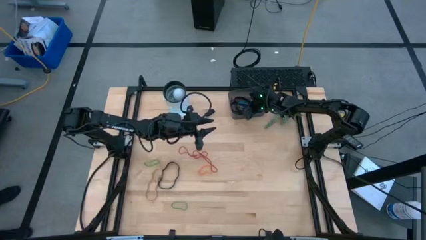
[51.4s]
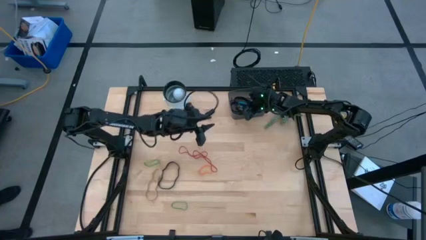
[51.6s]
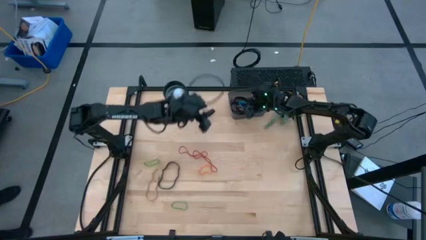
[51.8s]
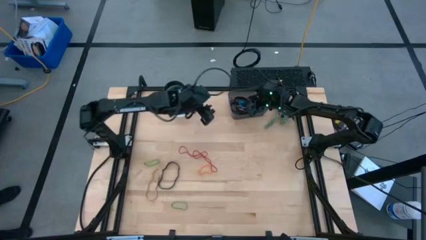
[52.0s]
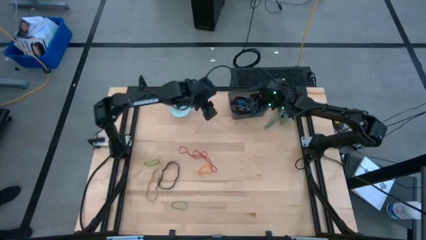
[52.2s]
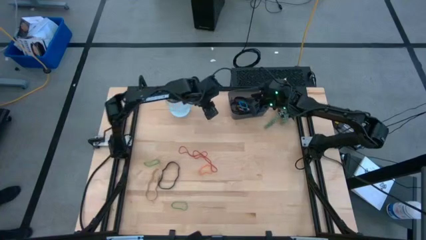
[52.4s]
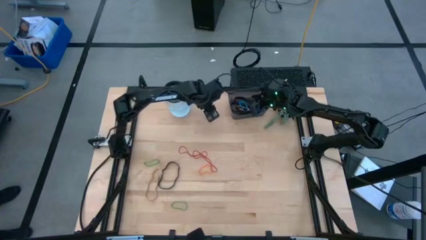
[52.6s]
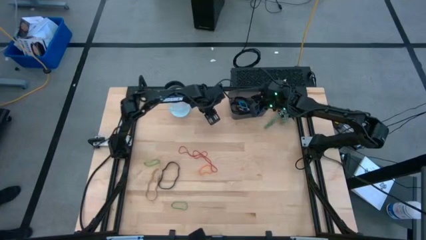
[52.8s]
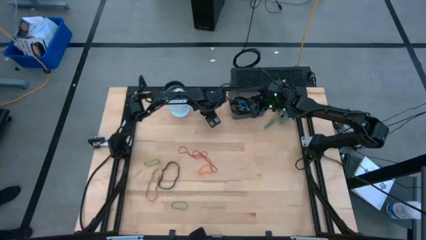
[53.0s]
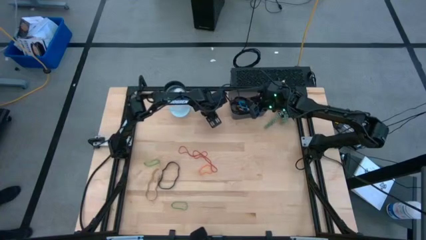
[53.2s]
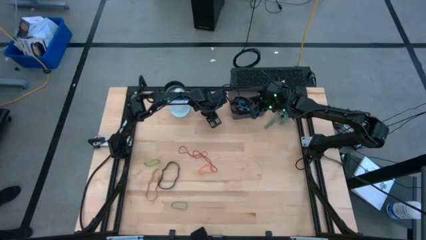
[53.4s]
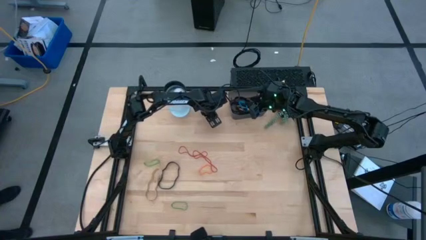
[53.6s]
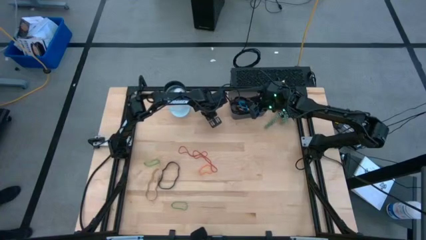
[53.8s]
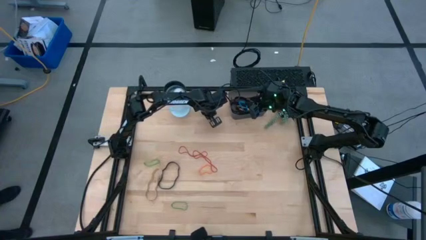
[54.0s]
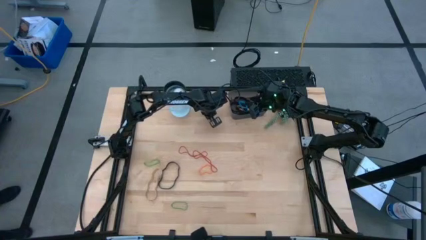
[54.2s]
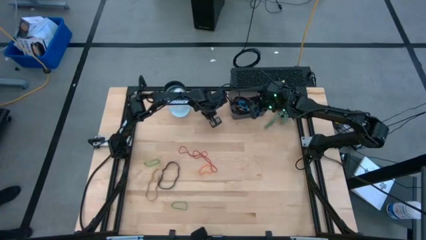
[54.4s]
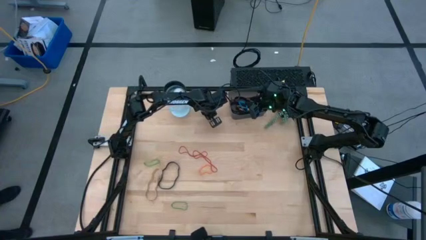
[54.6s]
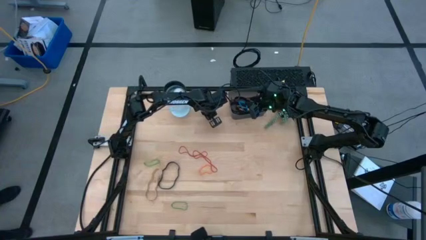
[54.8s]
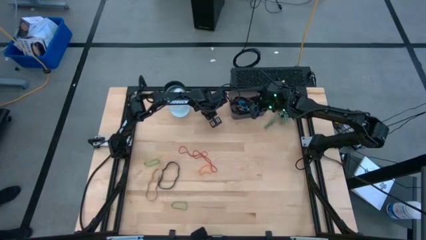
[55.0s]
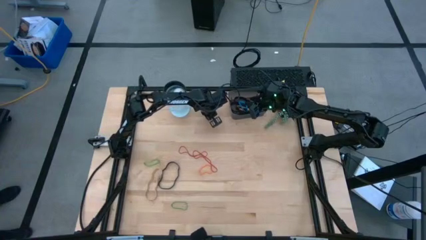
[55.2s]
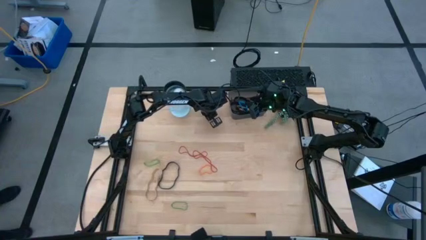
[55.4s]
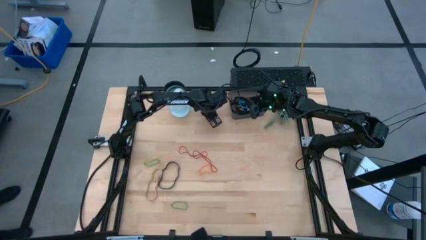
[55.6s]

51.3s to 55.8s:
Task: Pick and place rubber bands into bin
Put the black rubber band into the black bin

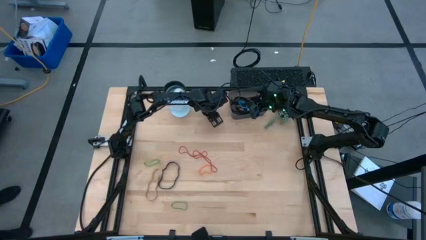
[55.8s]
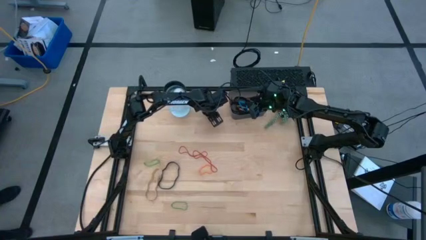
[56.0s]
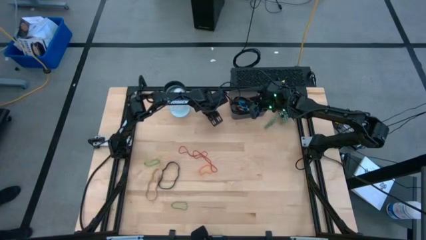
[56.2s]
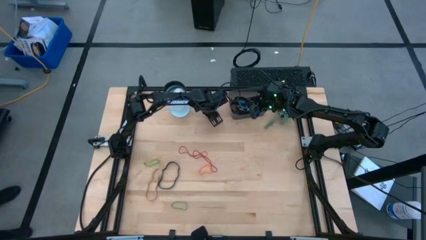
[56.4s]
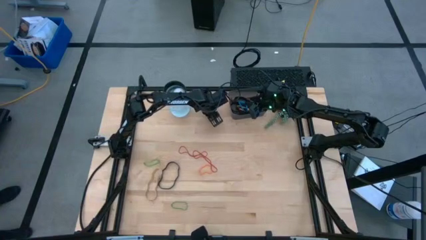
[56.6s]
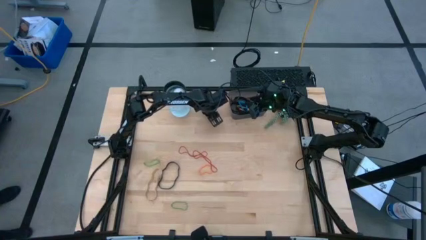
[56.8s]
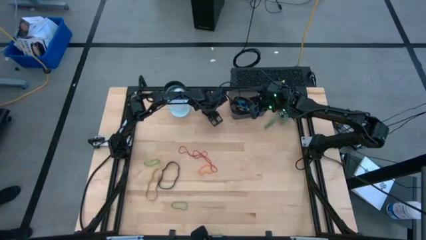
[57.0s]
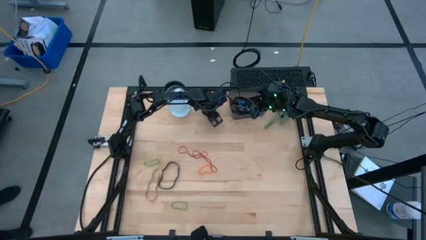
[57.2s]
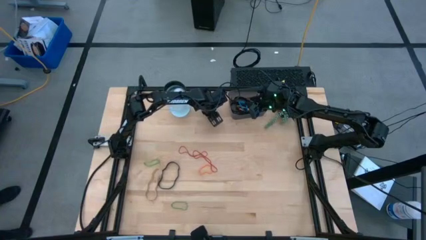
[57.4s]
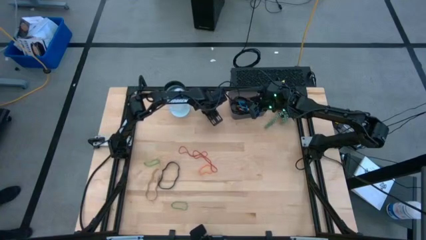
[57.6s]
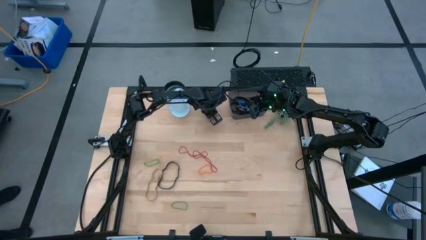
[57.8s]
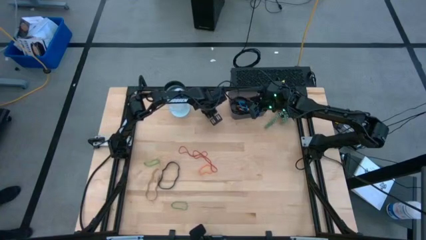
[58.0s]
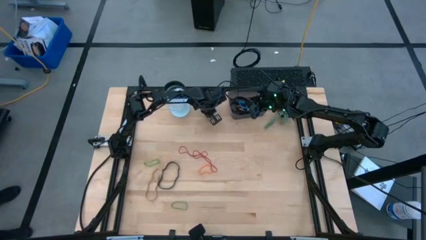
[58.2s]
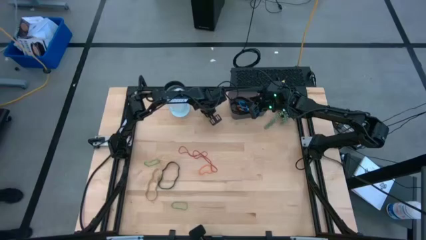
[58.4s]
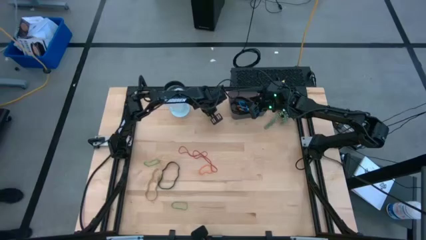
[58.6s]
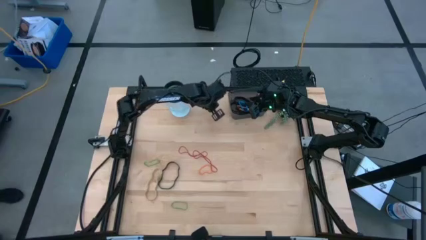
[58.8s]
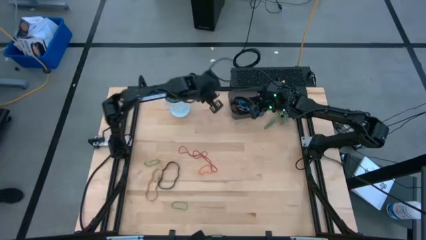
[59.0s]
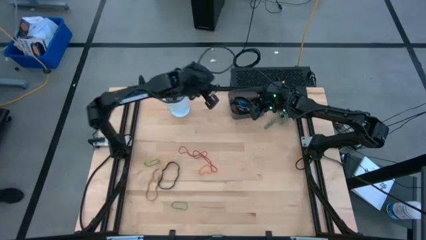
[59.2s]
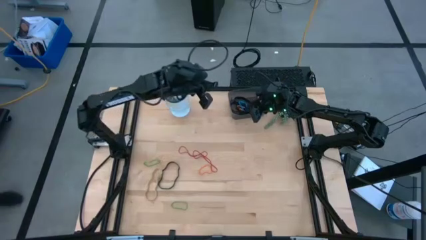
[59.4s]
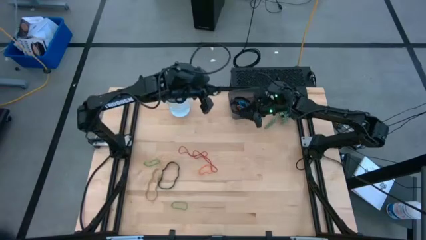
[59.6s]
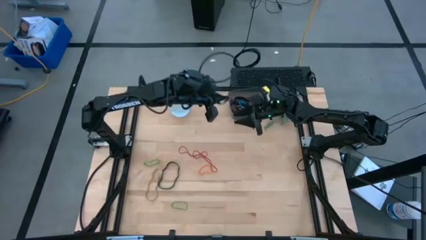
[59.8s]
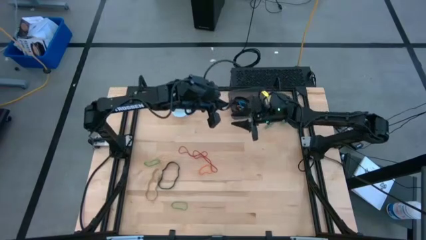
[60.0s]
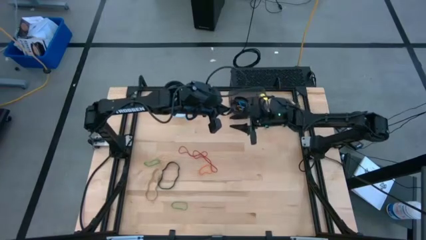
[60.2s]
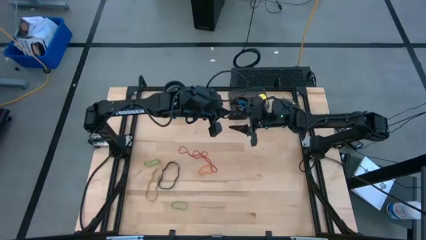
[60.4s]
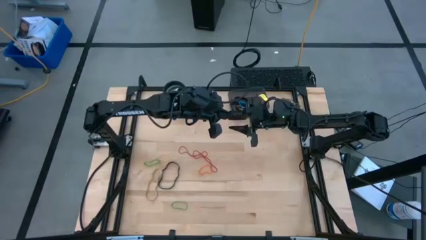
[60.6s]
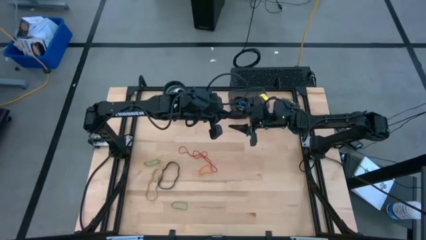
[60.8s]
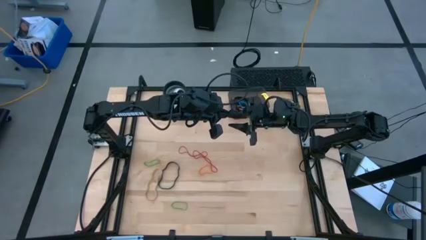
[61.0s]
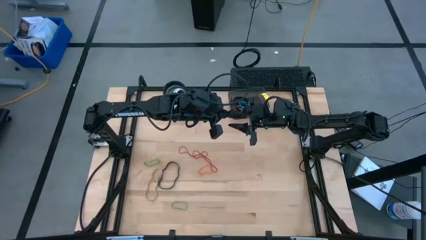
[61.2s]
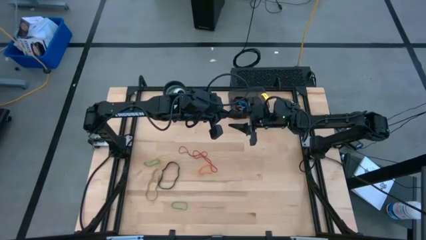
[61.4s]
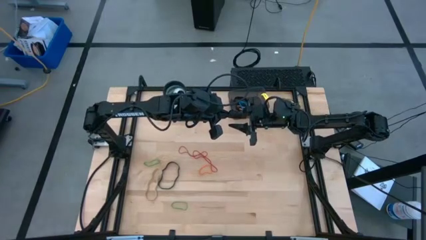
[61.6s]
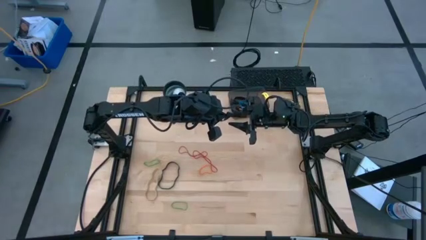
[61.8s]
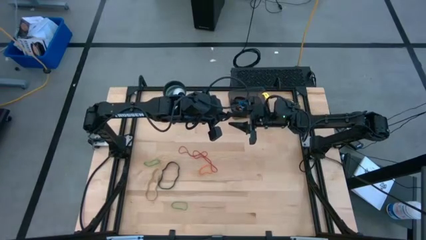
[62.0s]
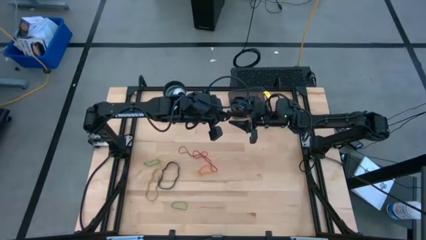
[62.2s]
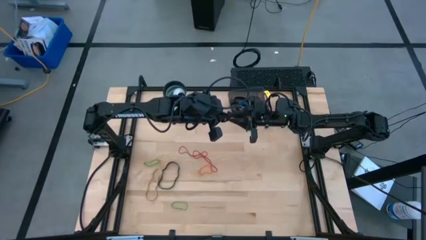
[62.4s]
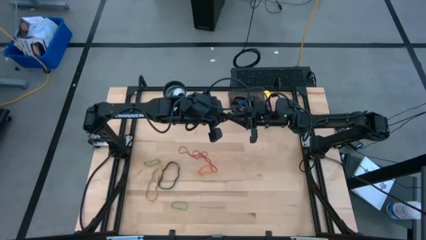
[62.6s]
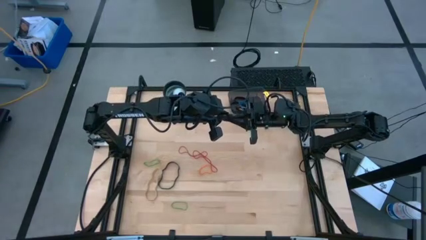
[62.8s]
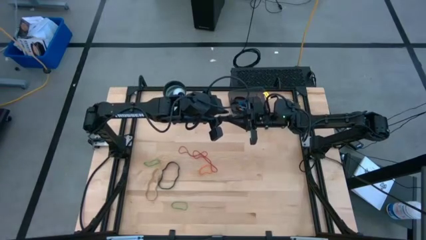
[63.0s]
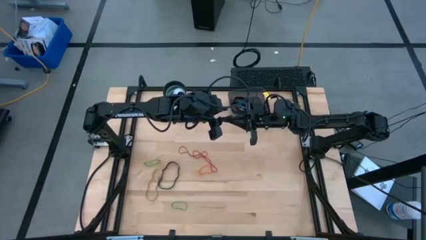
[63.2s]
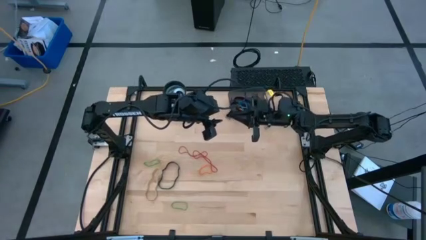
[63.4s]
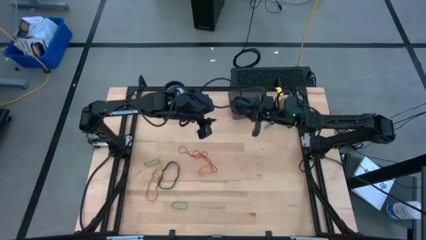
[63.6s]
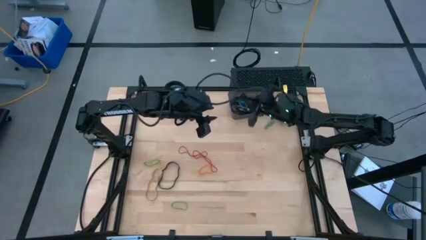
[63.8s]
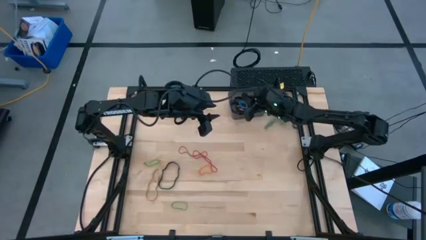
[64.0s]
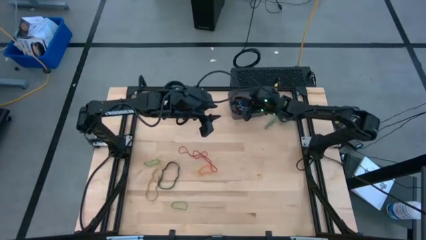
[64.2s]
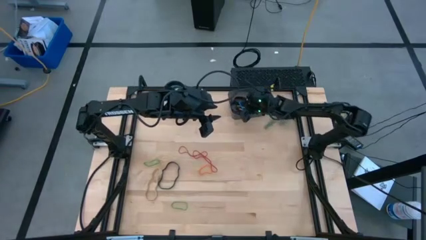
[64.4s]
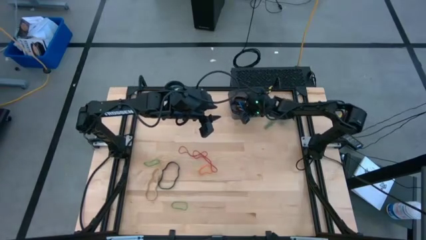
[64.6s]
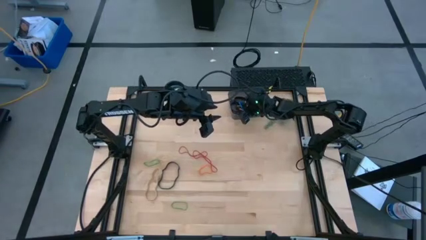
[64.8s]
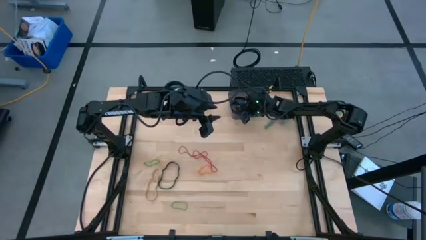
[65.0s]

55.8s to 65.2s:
Put the black rubber band into the black bin

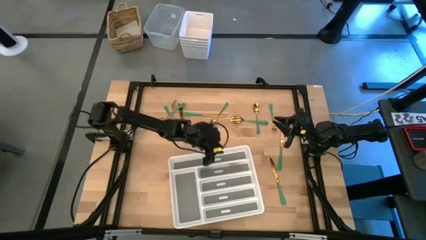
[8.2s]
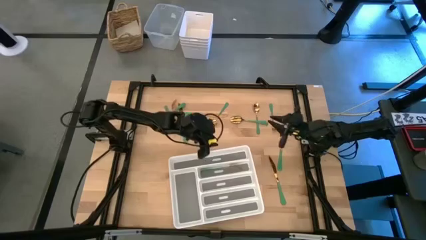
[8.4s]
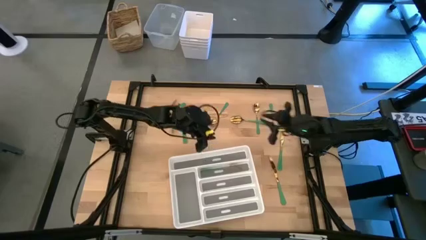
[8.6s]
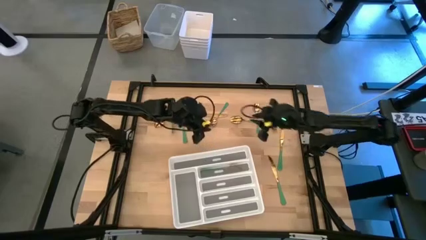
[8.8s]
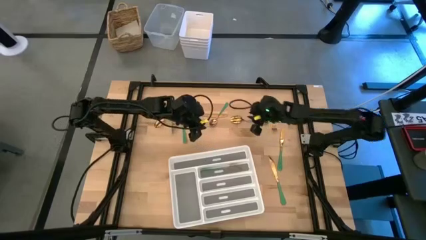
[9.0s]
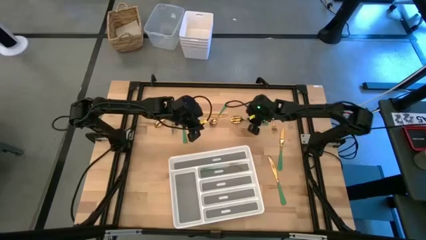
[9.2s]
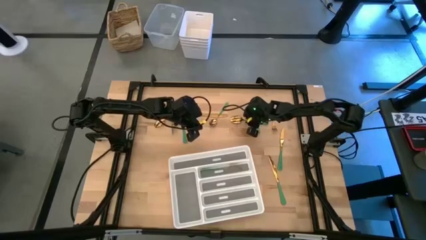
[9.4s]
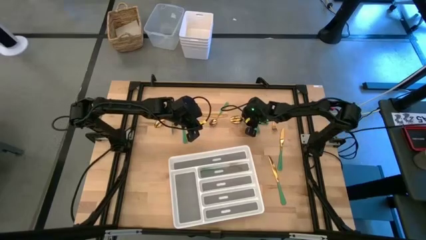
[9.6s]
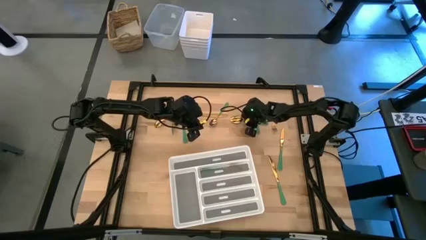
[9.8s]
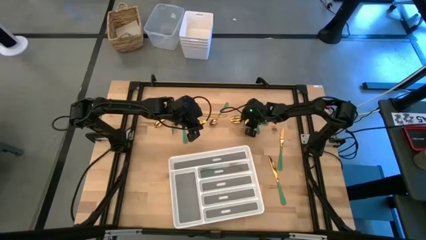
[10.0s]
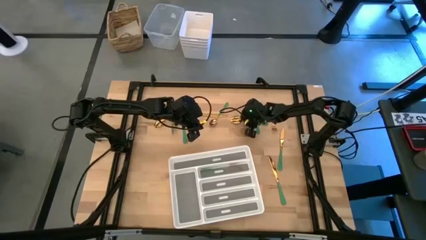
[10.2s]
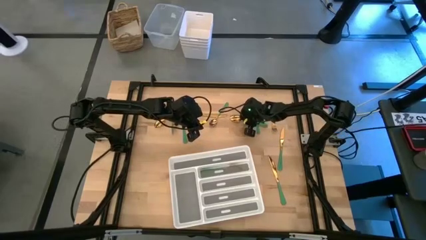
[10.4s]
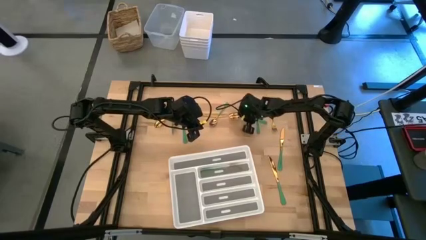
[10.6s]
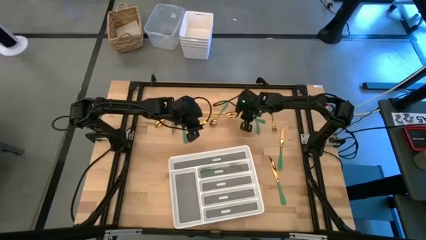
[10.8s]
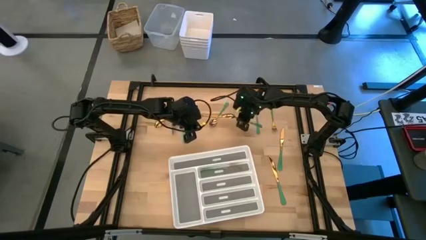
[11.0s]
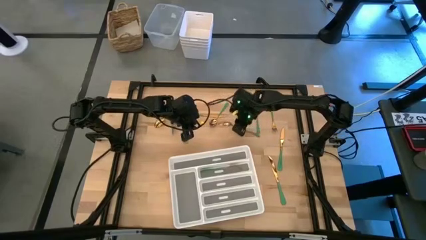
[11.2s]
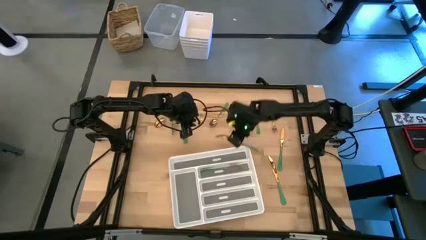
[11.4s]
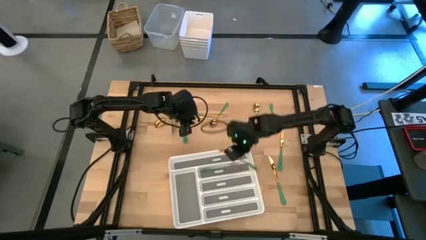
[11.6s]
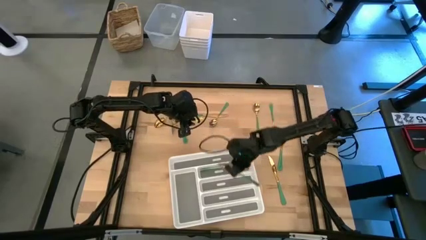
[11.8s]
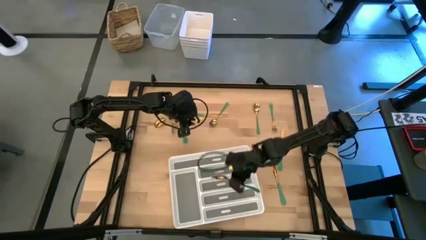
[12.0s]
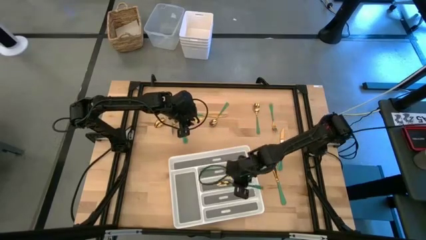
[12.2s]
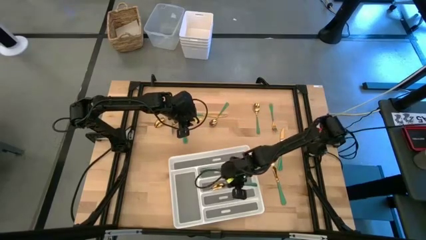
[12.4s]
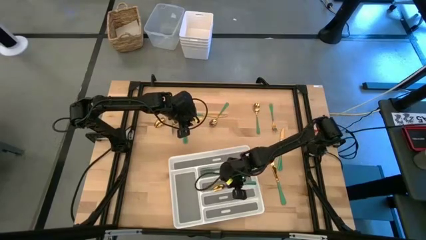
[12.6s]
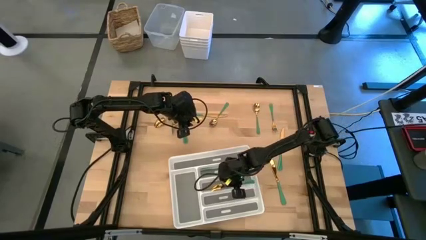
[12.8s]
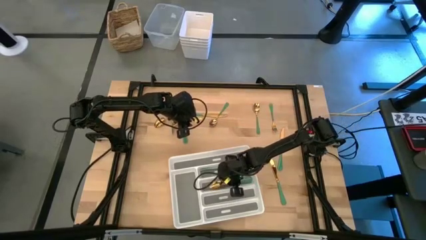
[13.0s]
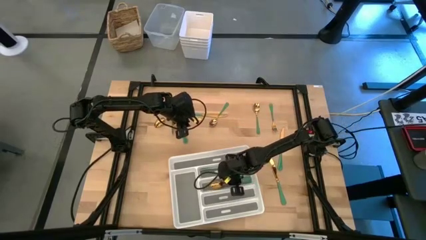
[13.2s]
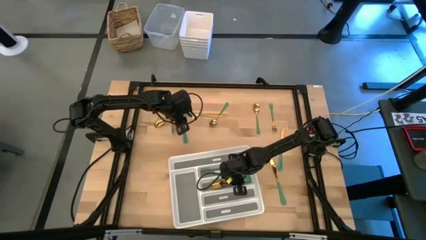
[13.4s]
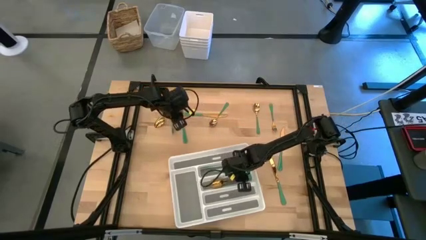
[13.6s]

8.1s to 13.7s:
Task: Sort silverware
Put the green spoon into the white silverware tray
